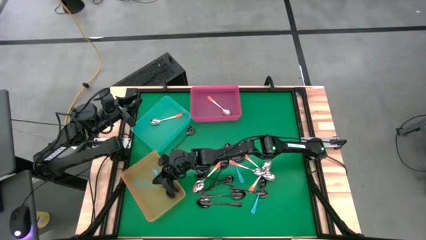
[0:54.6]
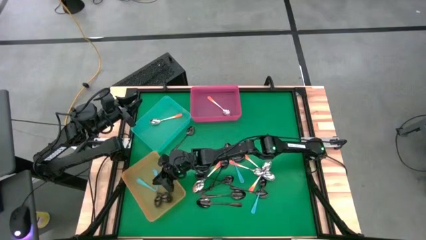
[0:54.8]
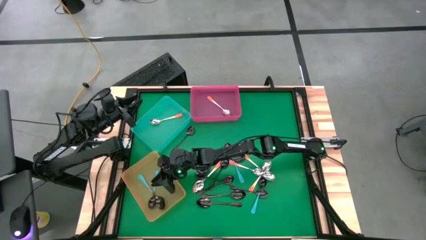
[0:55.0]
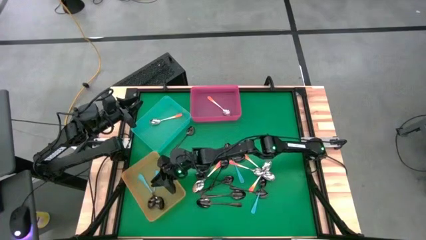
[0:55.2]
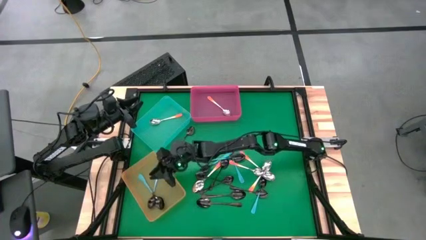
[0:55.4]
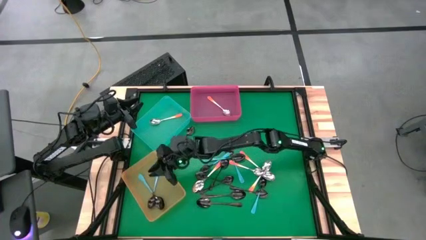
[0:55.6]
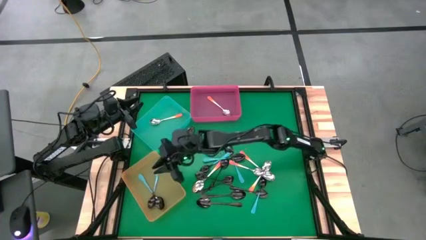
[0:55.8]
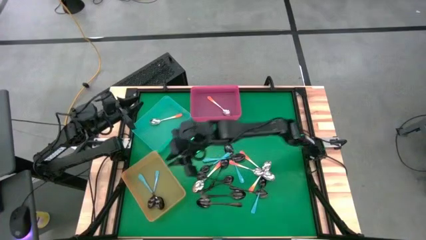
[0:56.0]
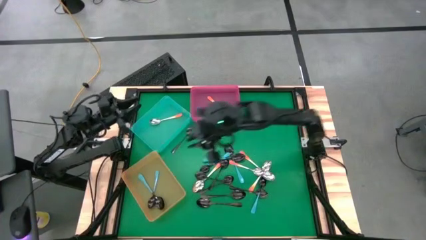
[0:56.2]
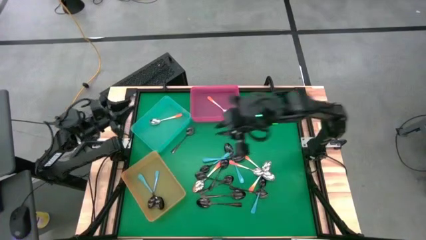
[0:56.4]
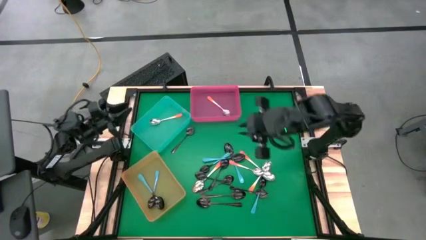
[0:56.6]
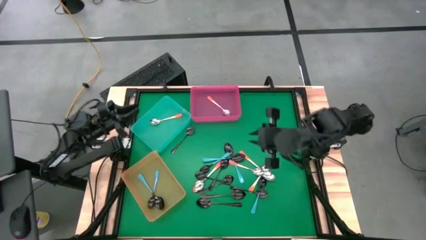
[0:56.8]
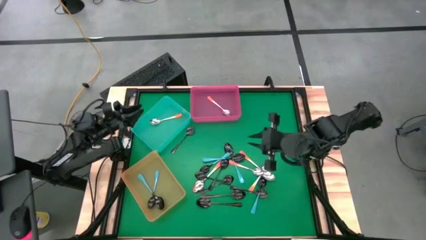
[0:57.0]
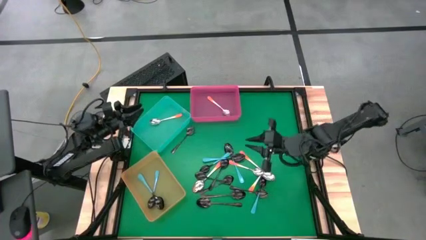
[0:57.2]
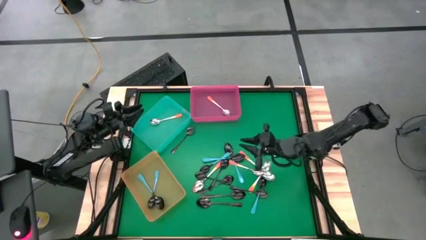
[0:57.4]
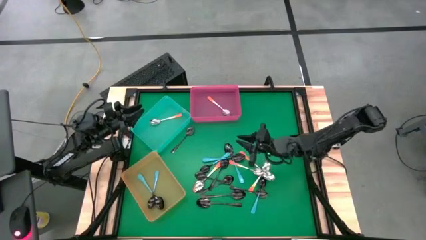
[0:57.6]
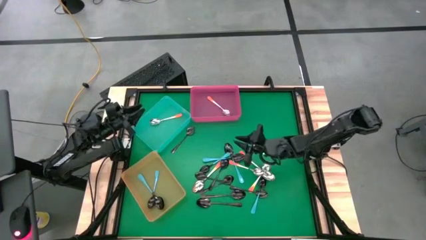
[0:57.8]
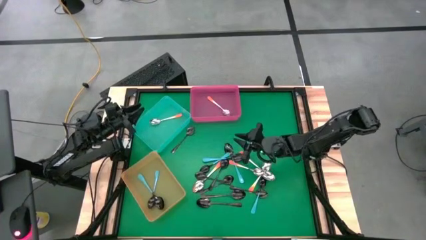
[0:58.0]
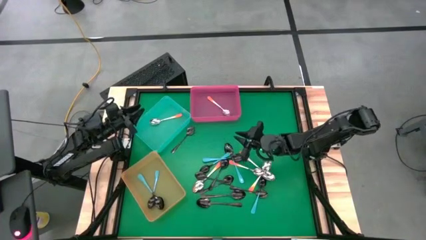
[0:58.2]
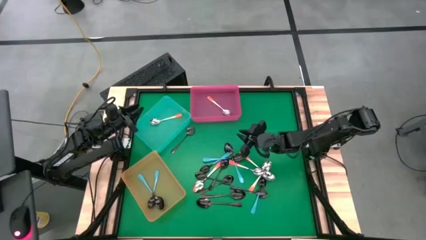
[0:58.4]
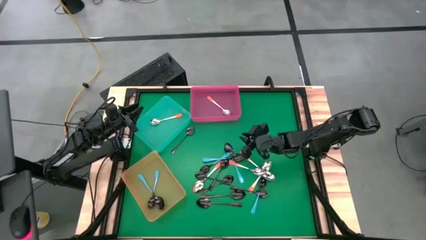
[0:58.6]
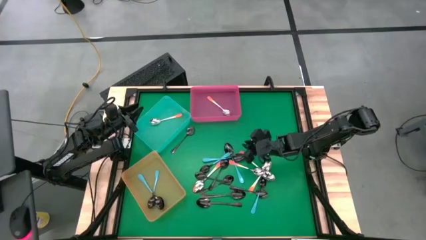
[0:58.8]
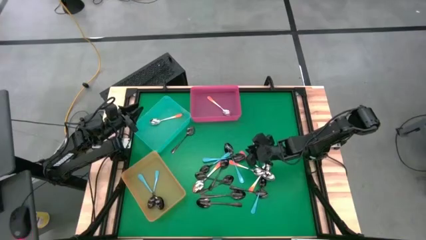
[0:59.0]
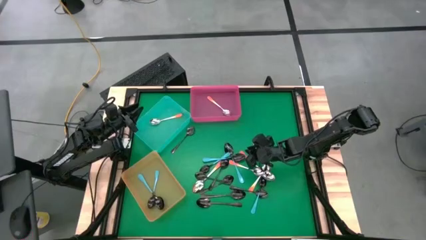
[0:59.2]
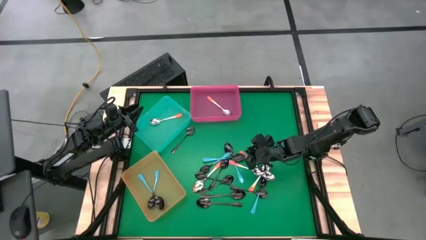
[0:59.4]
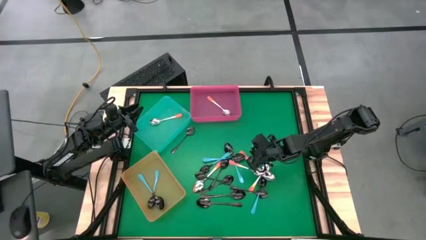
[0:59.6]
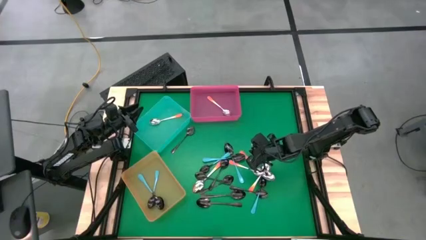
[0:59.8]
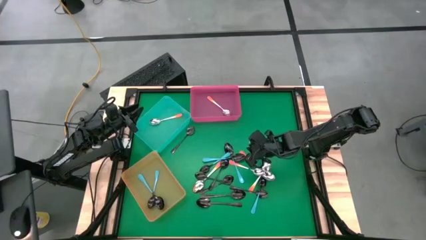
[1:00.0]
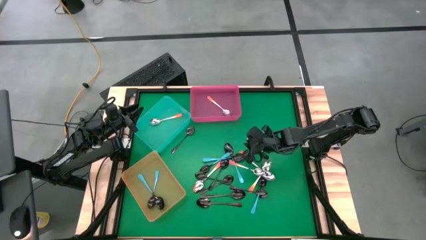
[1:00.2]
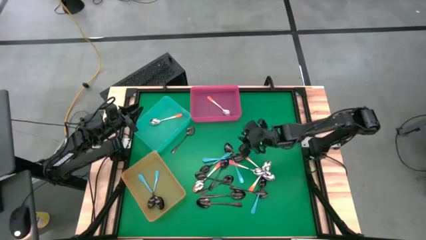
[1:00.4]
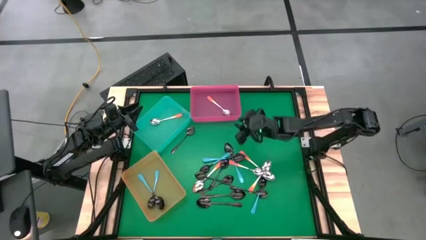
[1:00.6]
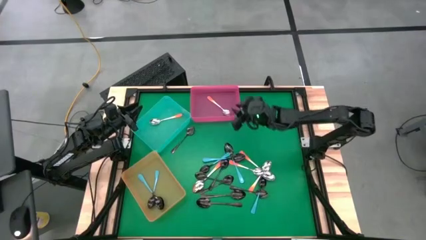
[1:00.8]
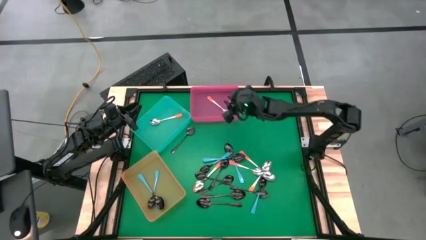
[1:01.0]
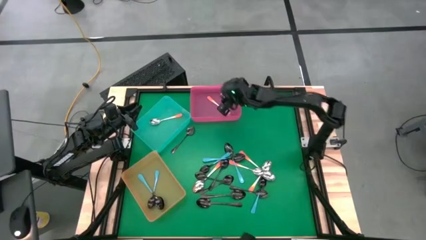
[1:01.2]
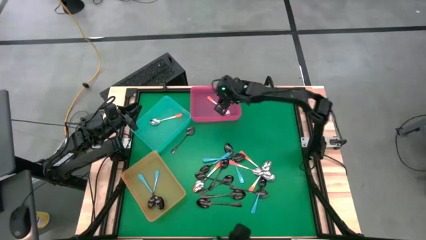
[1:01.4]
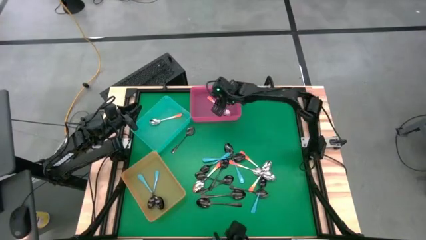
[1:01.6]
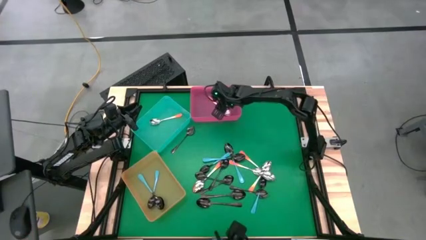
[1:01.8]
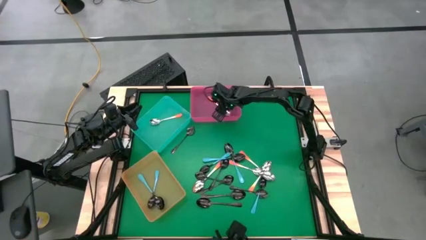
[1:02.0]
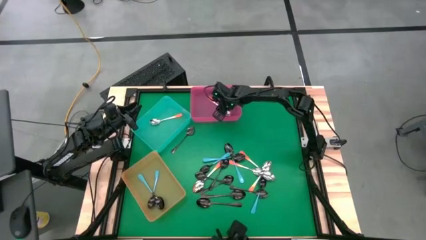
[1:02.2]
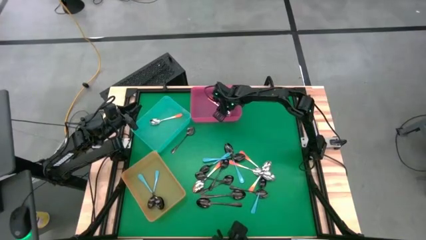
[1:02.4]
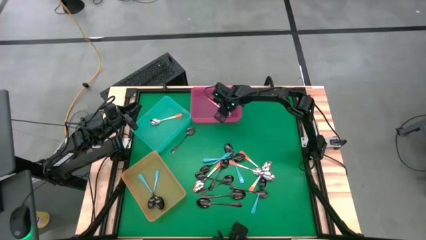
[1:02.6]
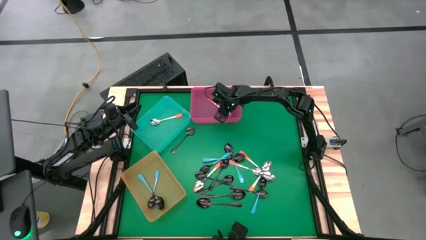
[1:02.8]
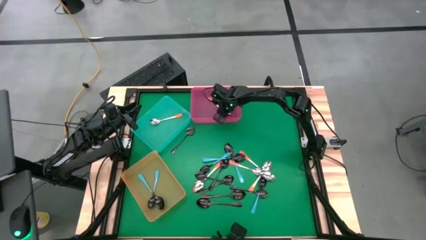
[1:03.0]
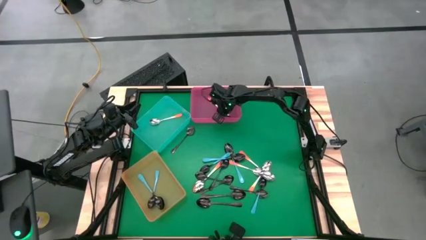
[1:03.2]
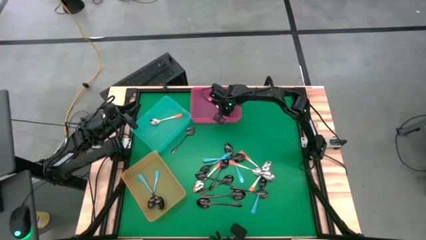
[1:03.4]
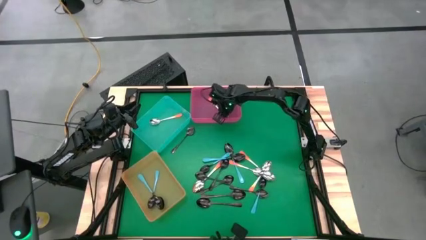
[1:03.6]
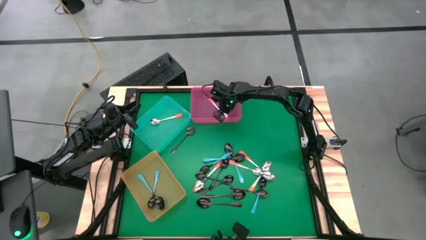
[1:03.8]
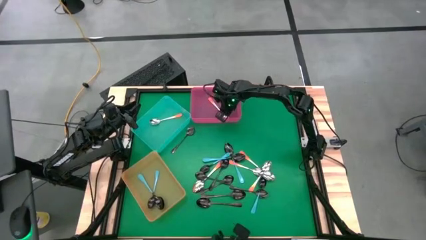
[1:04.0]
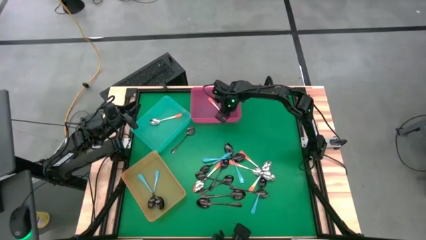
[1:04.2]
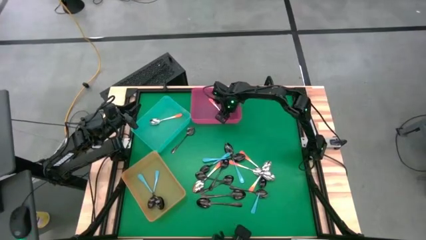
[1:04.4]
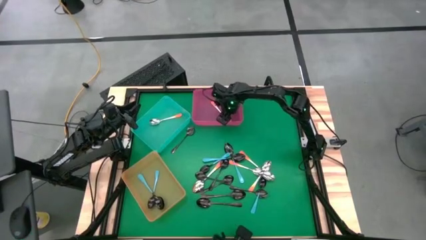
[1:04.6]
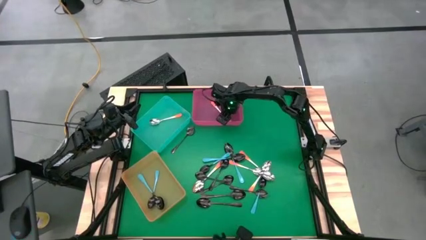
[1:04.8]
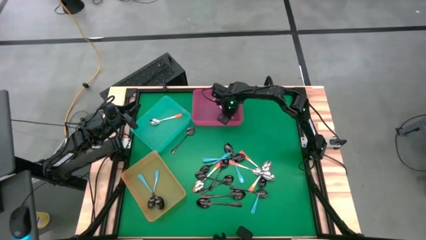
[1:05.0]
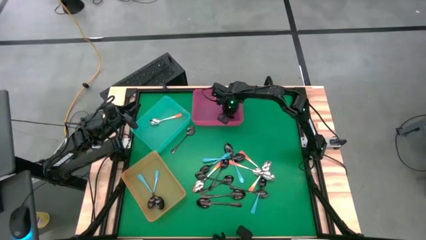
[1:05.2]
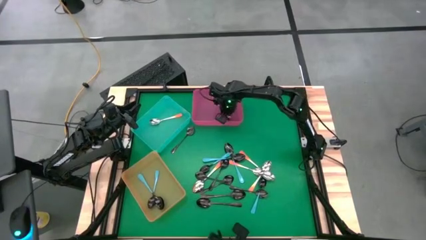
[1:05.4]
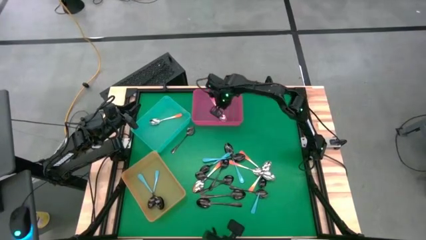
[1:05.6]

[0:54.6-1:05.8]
Task: Sort silverware by color (type)
Put the orange spoon into the blue bin

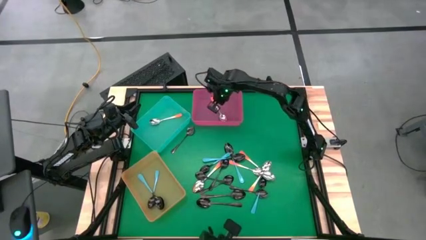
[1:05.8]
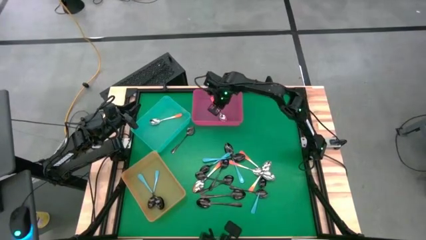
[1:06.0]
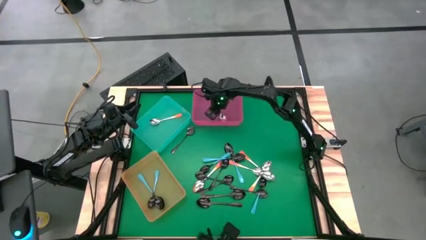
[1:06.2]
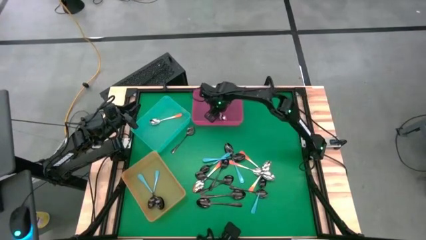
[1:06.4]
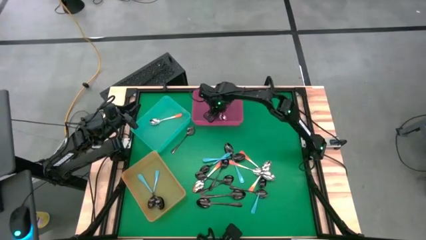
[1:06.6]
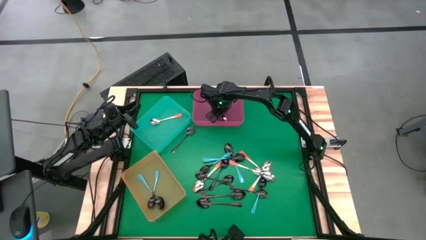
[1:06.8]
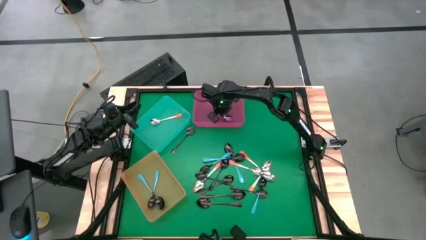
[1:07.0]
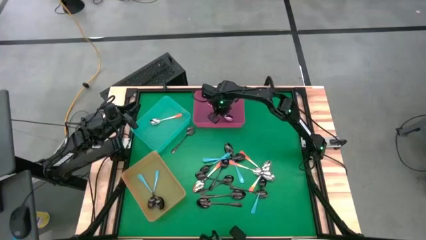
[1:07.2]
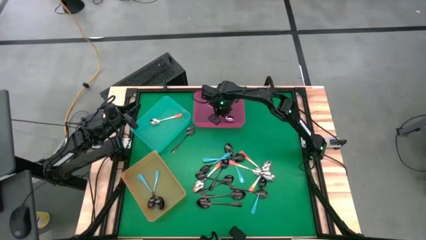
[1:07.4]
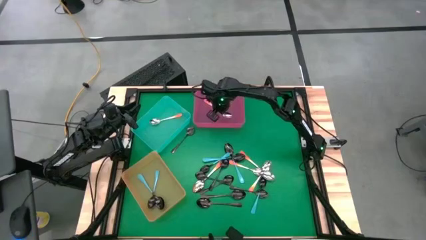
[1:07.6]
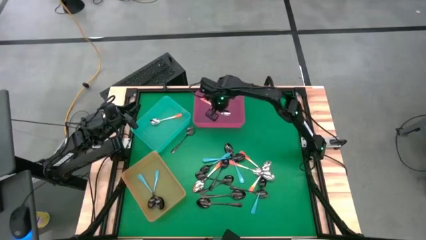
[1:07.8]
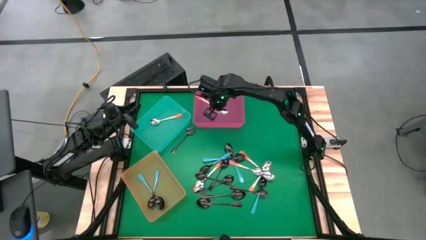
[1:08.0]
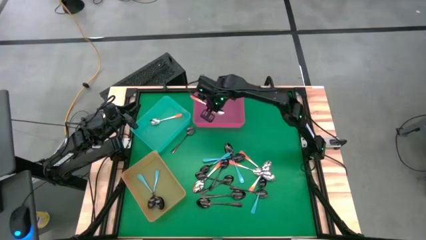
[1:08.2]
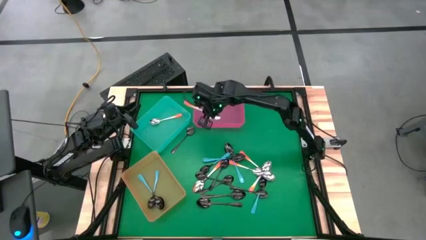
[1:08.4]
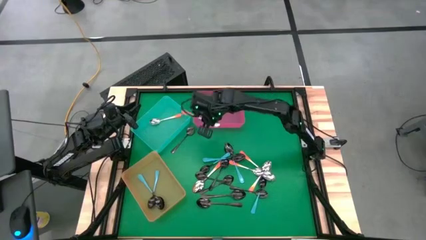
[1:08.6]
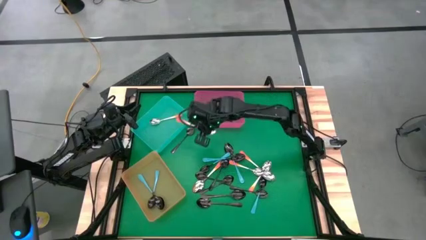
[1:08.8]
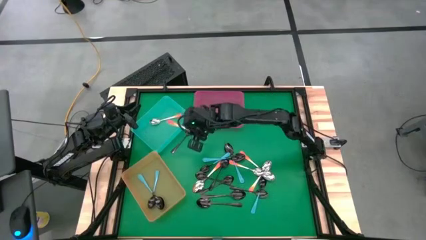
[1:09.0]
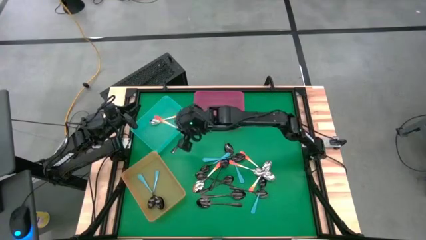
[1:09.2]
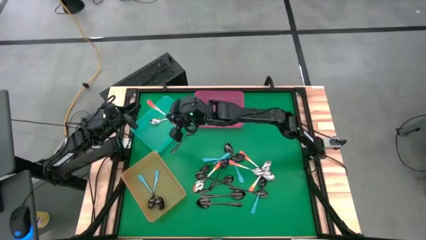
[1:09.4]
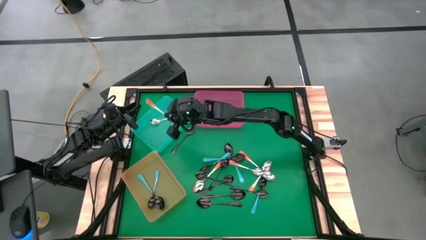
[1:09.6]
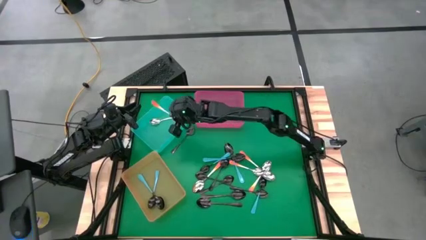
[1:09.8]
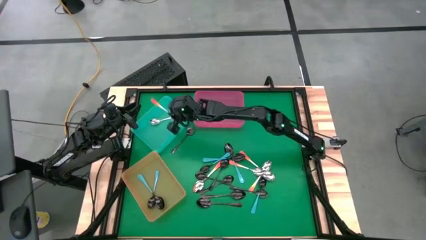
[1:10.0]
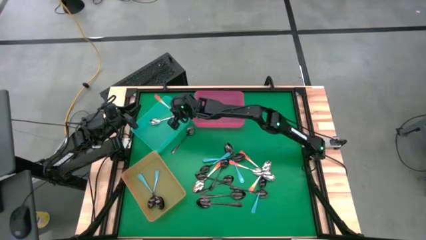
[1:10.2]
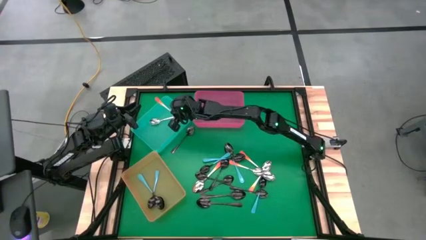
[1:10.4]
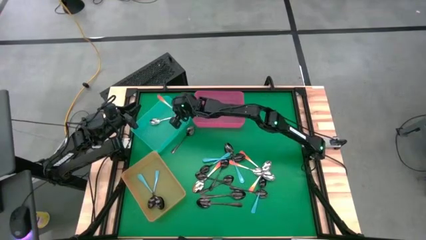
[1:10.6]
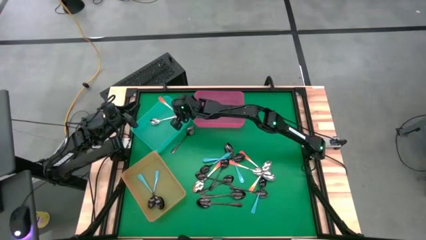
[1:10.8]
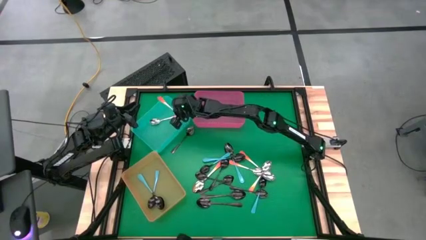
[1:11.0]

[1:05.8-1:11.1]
Put the orange spoon into the blue bin
